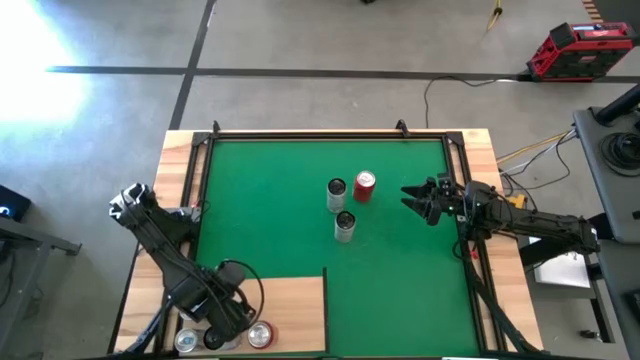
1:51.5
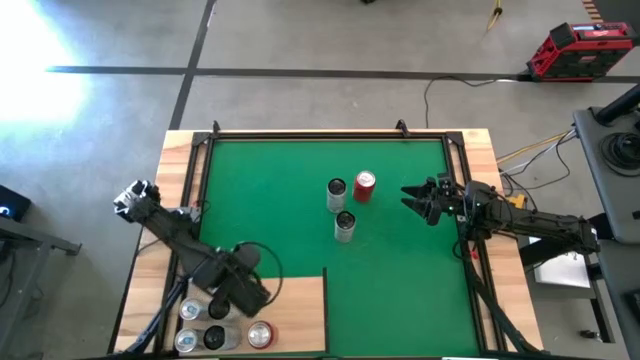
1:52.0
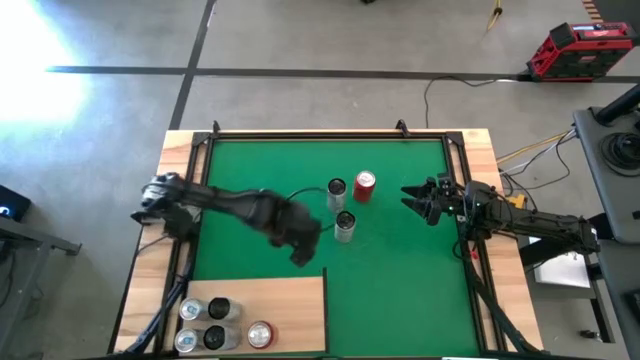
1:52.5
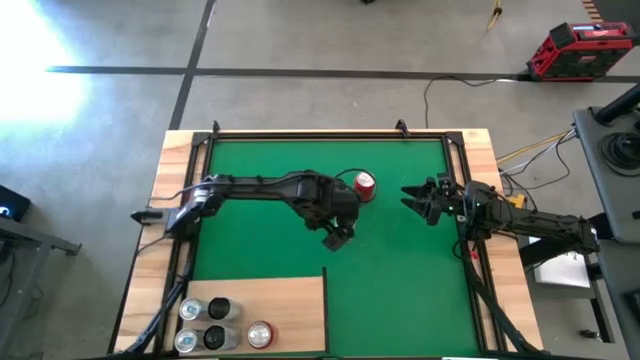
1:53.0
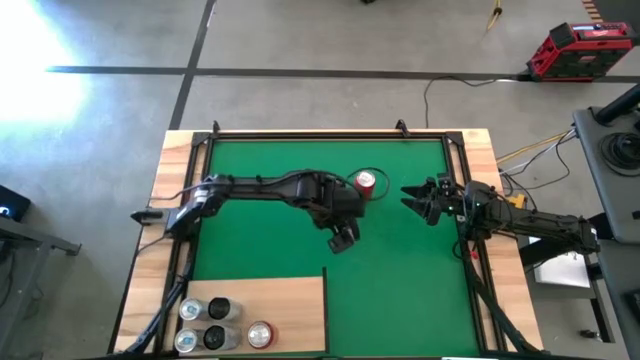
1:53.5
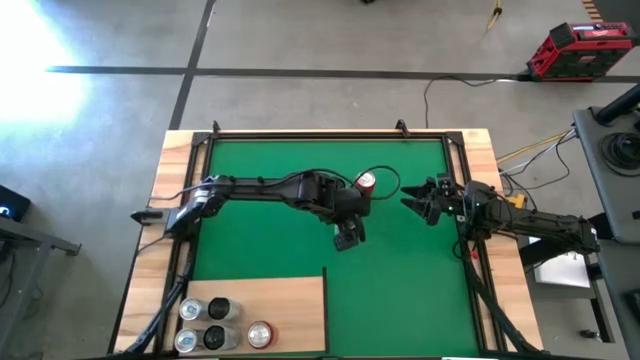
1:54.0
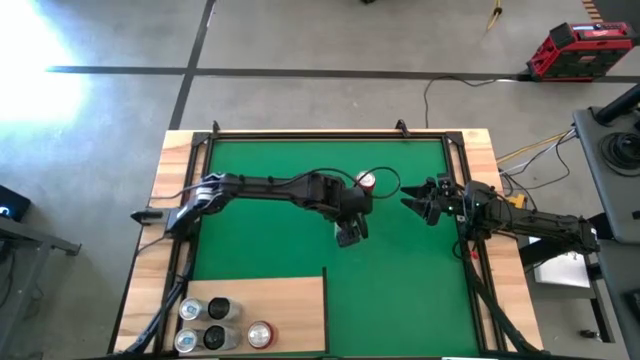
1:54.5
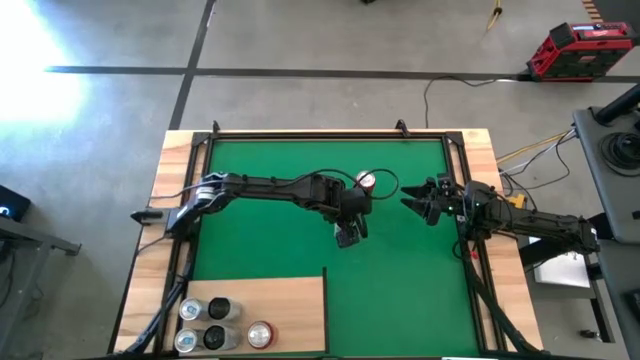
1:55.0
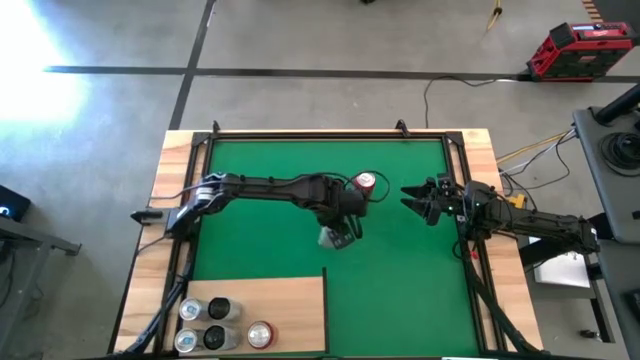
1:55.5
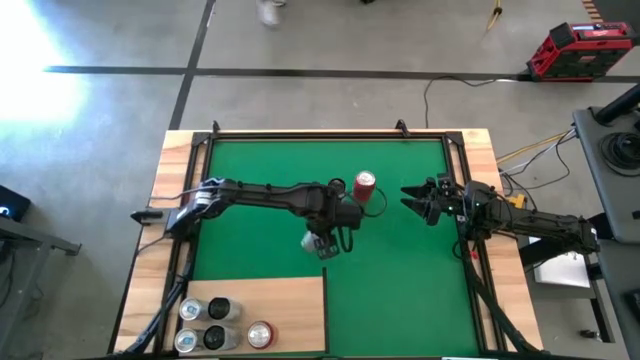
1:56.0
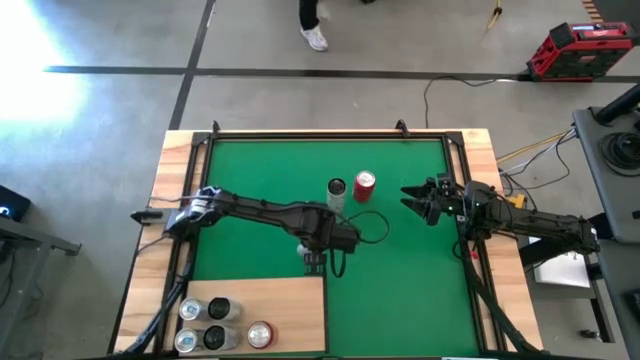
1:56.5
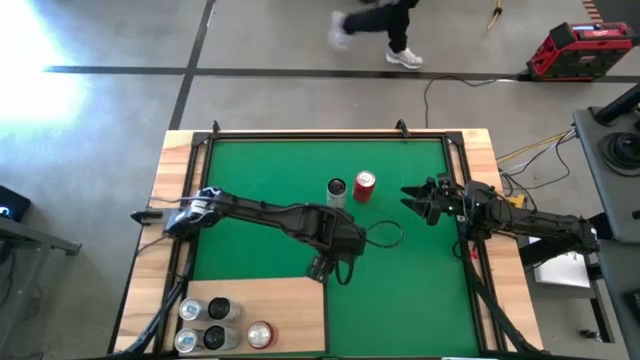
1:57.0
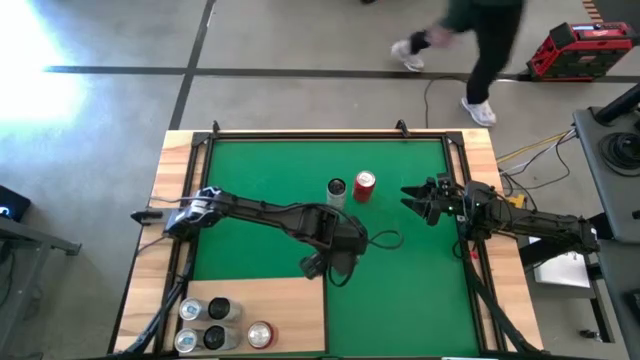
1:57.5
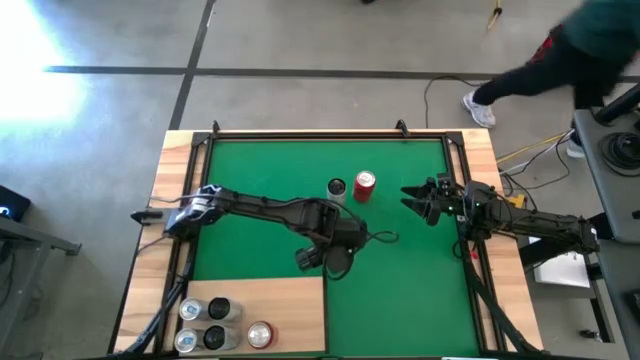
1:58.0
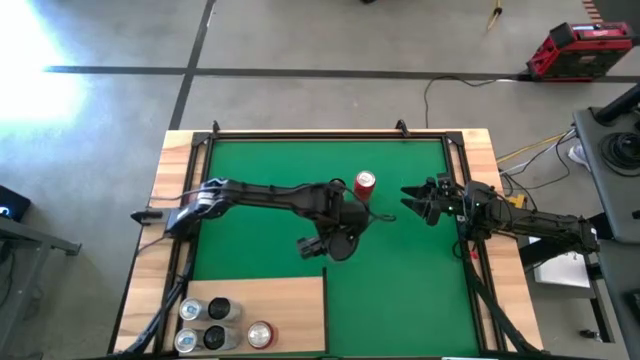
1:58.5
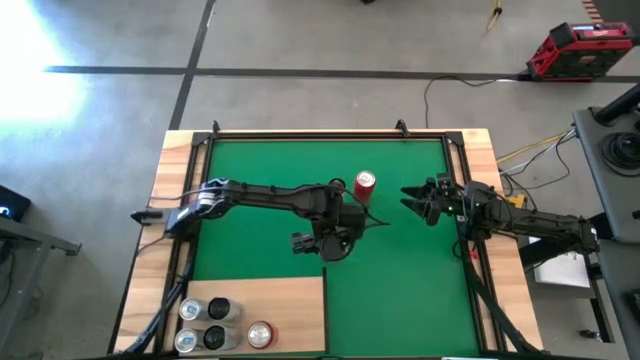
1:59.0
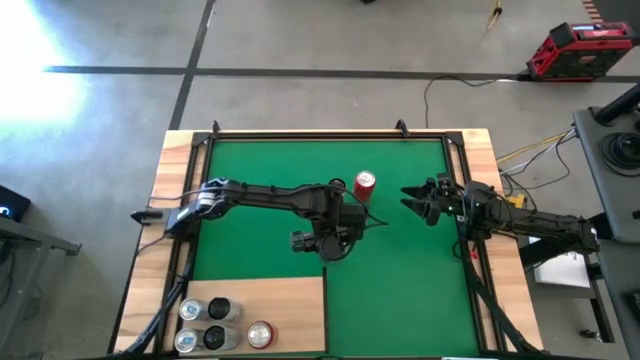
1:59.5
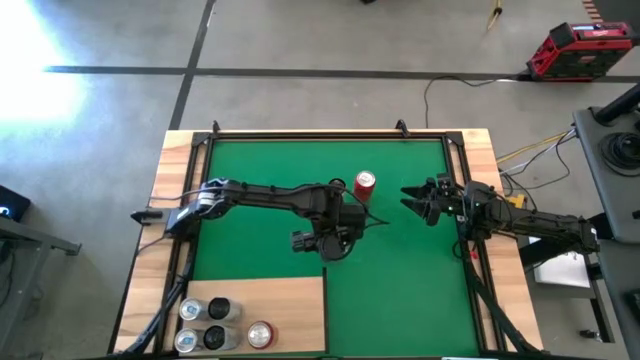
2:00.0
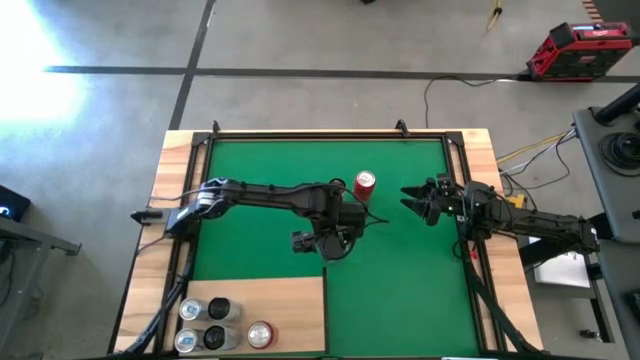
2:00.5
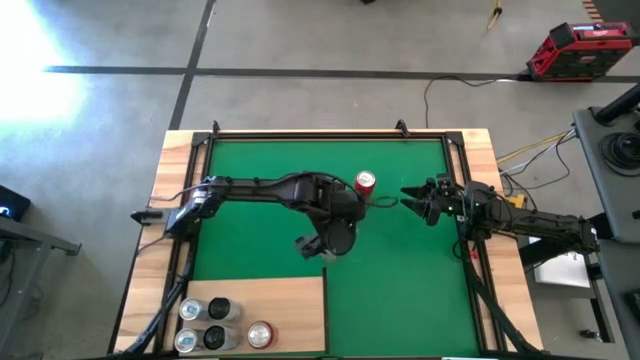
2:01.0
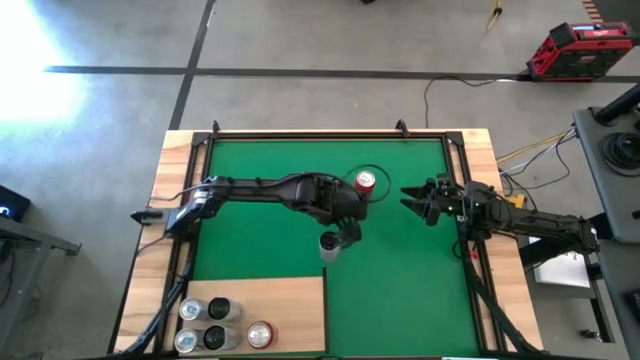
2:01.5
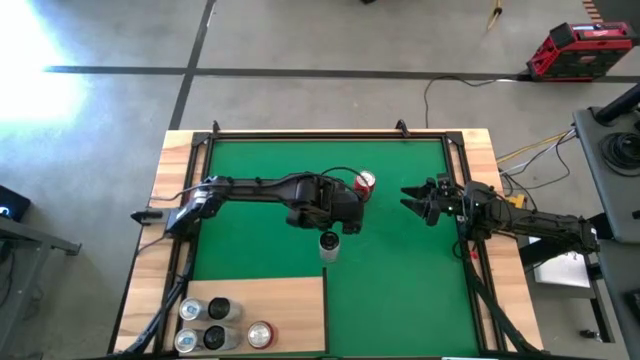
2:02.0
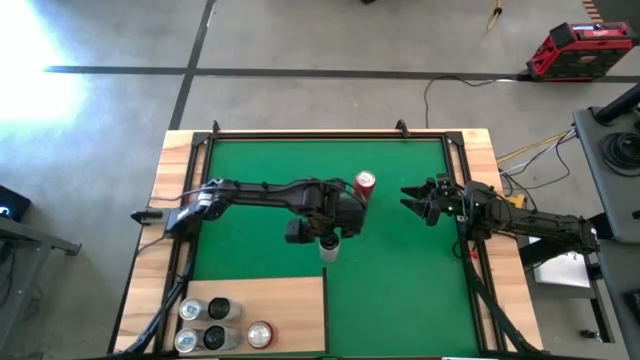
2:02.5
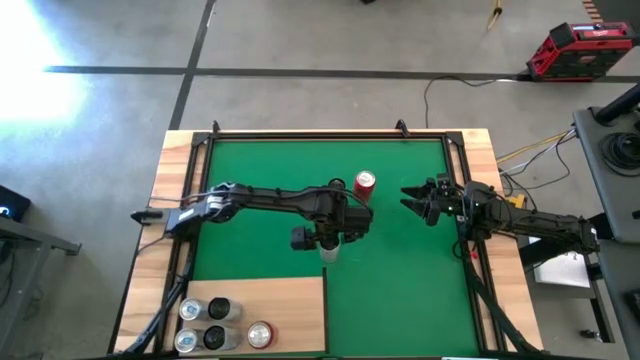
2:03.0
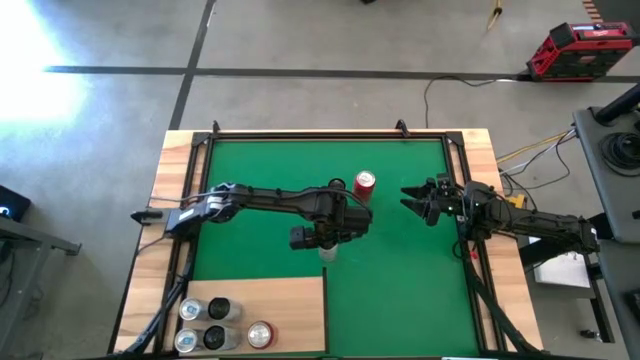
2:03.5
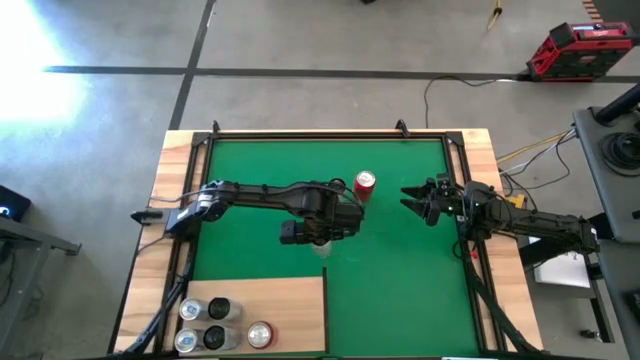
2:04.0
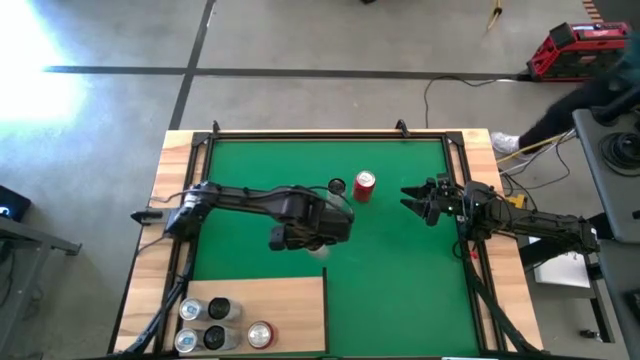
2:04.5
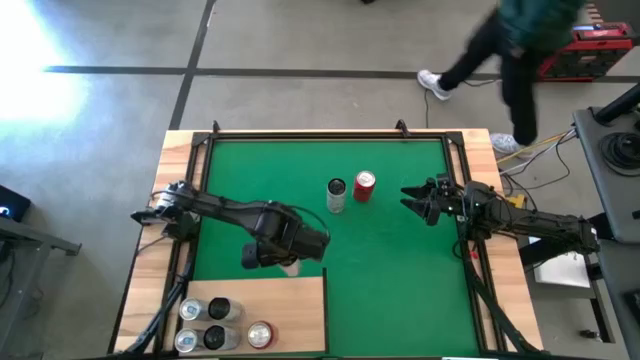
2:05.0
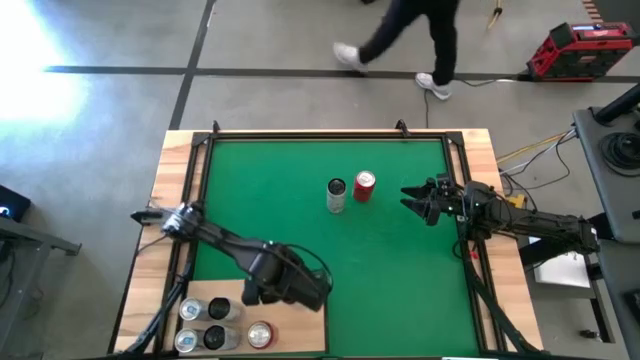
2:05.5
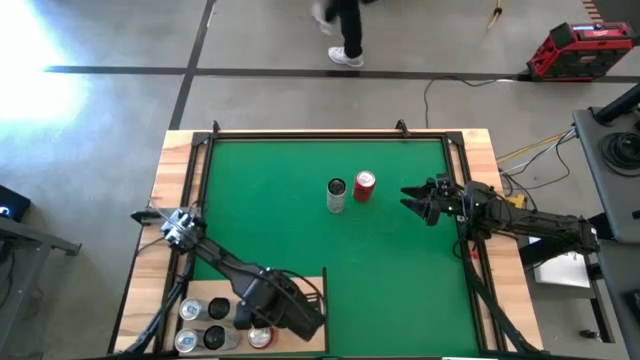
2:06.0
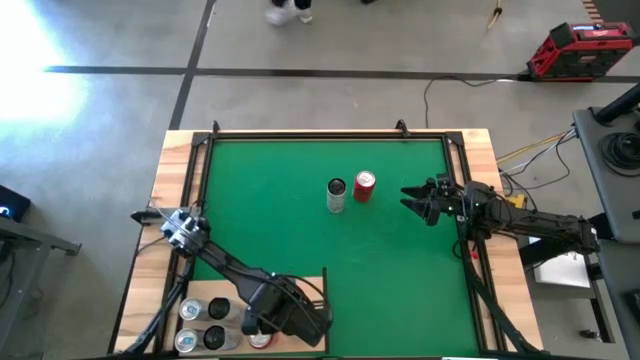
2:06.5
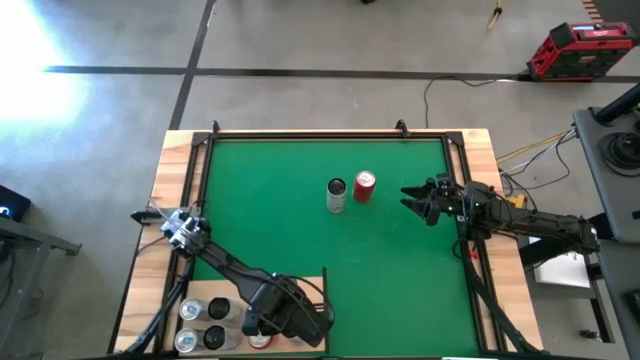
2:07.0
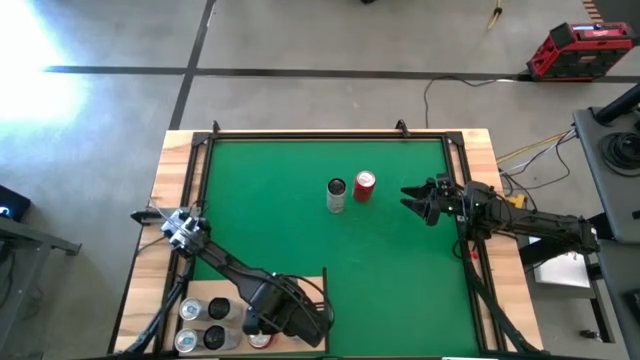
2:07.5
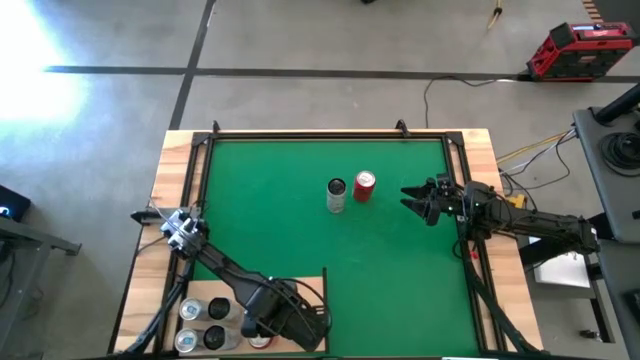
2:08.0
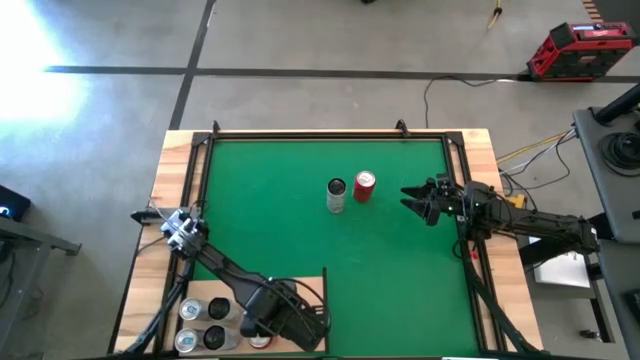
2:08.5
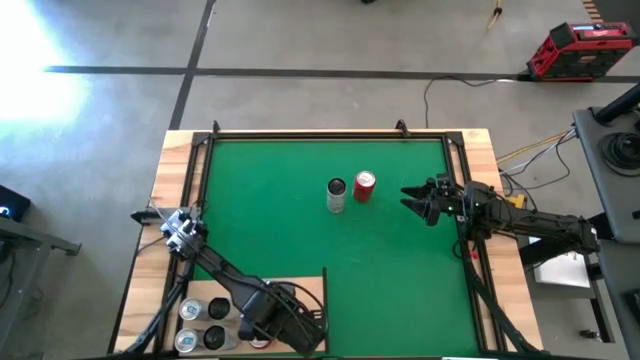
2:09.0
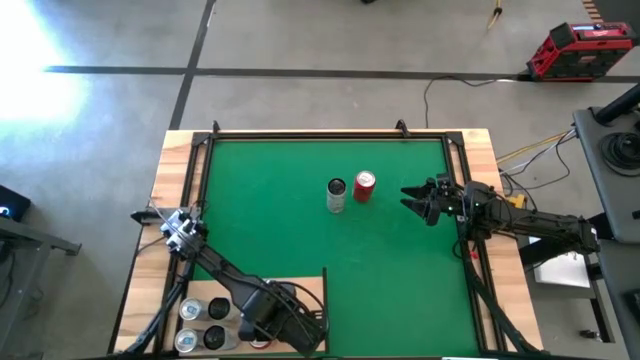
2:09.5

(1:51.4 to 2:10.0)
Task: Place canned beverage on shelf
Put the bottom white and yellow soda can on the shelf

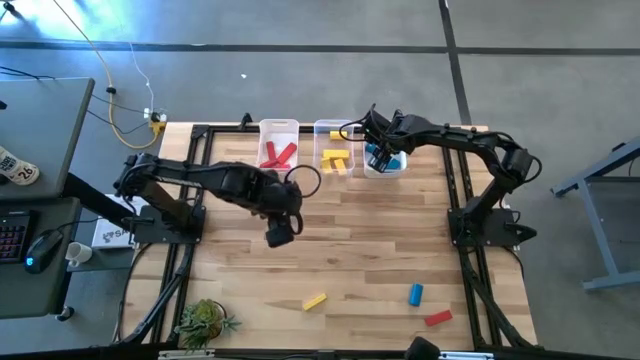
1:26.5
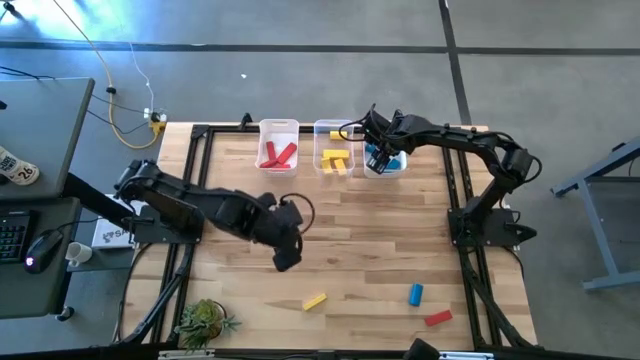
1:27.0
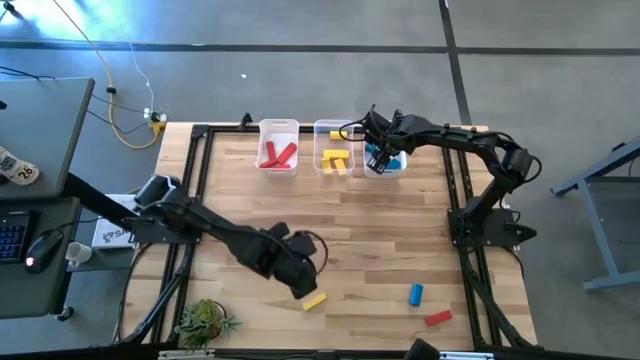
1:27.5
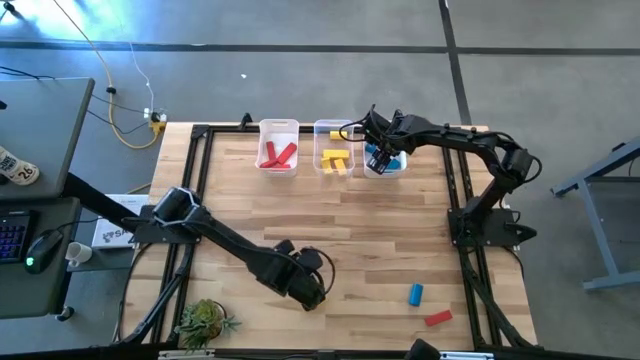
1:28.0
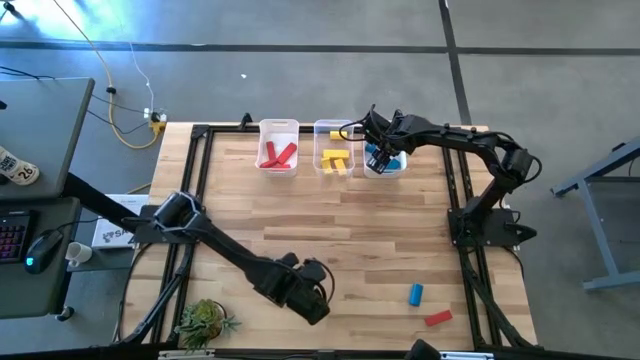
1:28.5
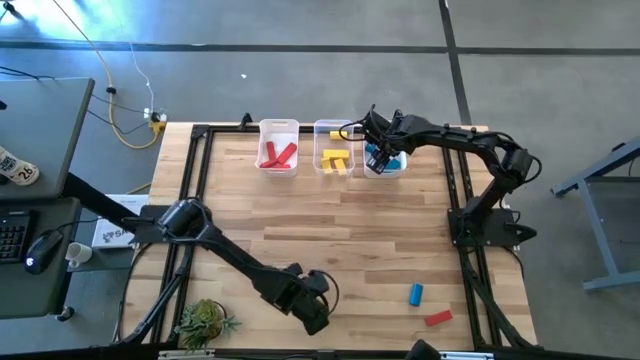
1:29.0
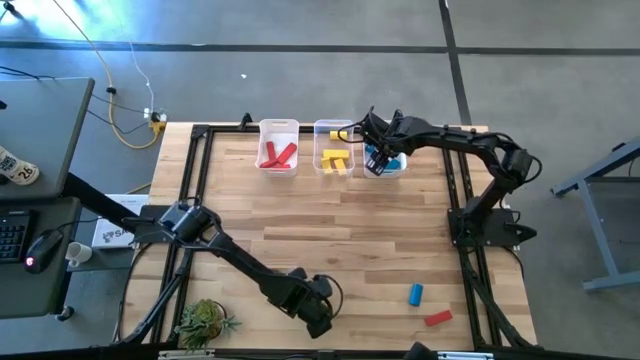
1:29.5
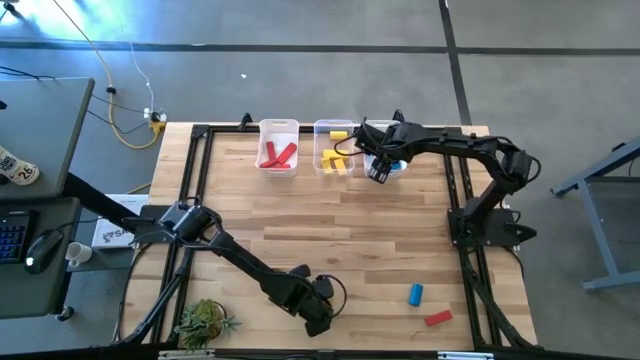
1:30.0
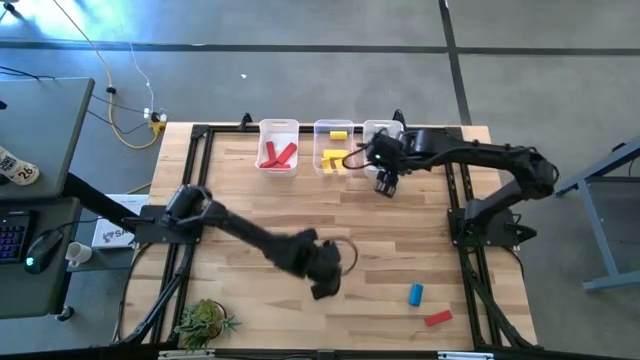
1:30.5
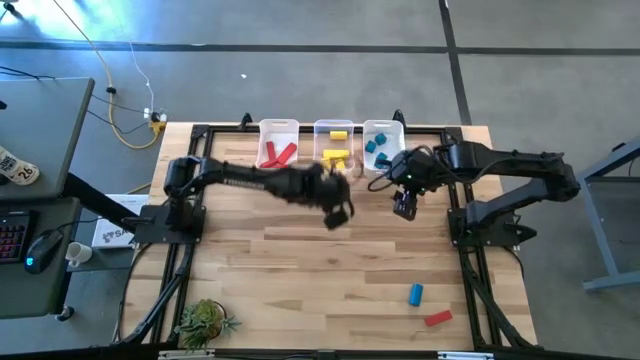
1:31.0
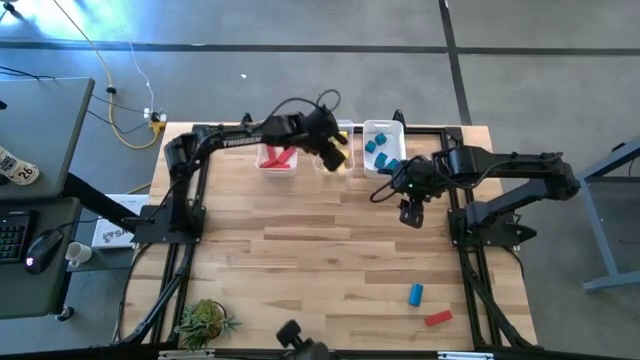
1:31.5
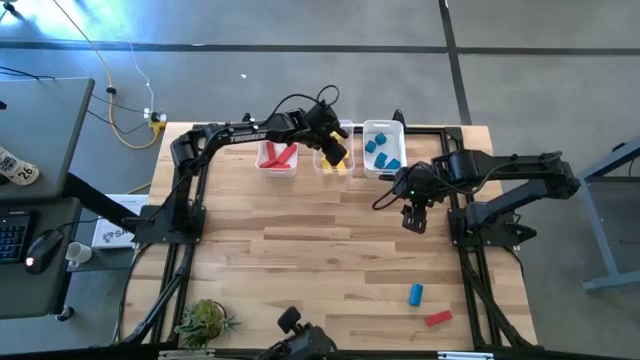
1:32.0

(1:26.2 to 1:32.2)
Task: Sort & place blocks by color
Put the yellow block into the transparent bin
